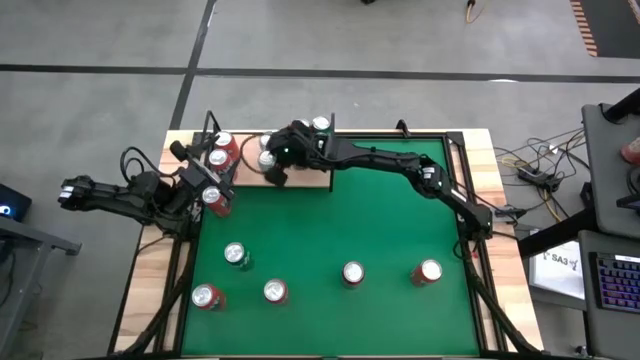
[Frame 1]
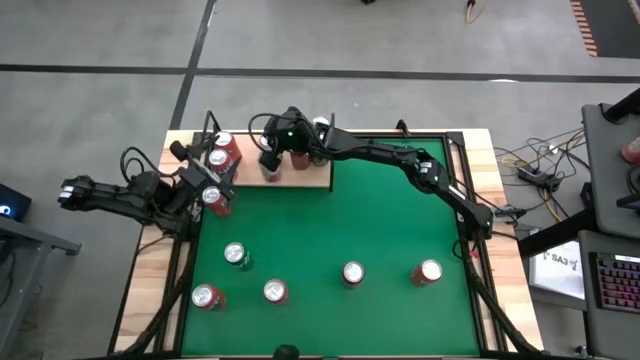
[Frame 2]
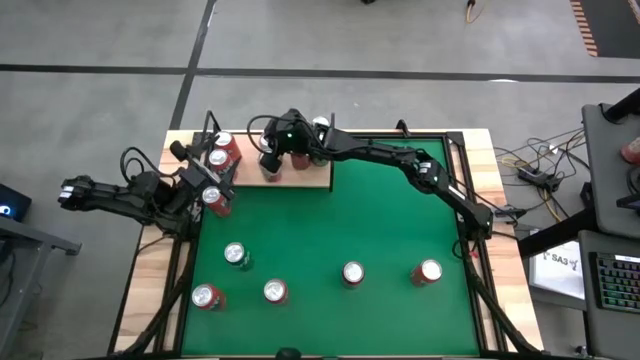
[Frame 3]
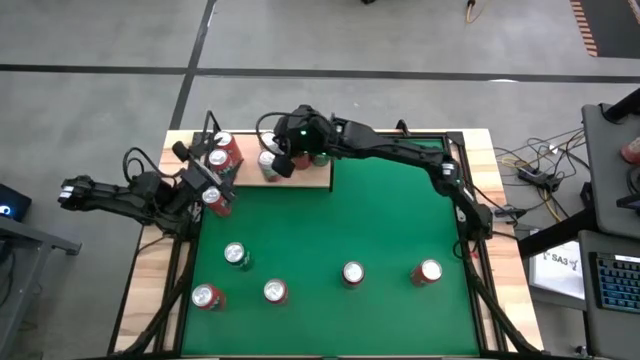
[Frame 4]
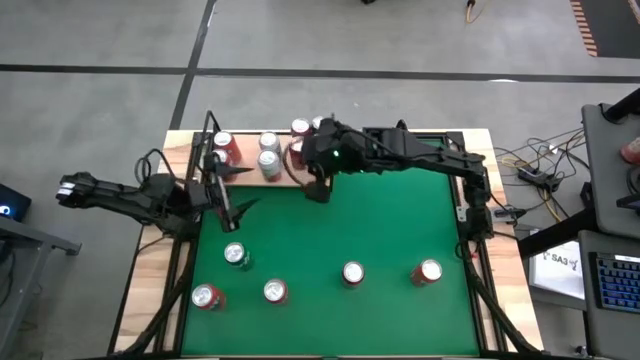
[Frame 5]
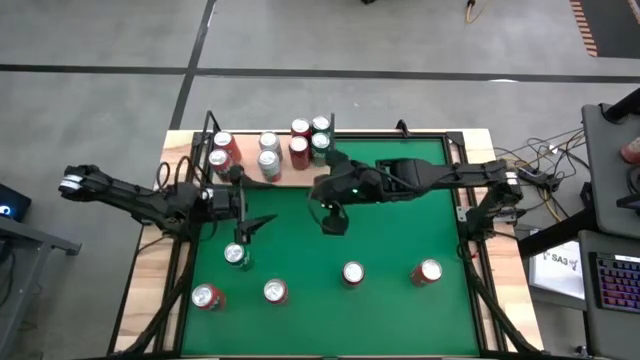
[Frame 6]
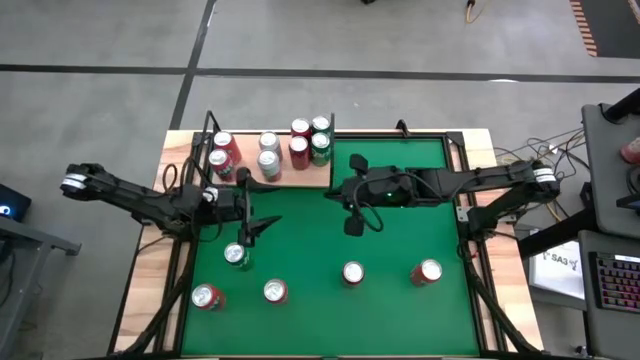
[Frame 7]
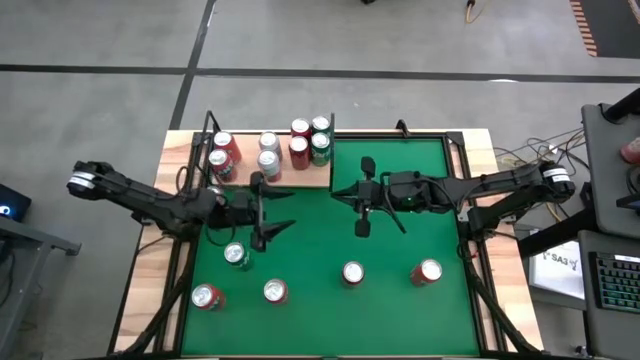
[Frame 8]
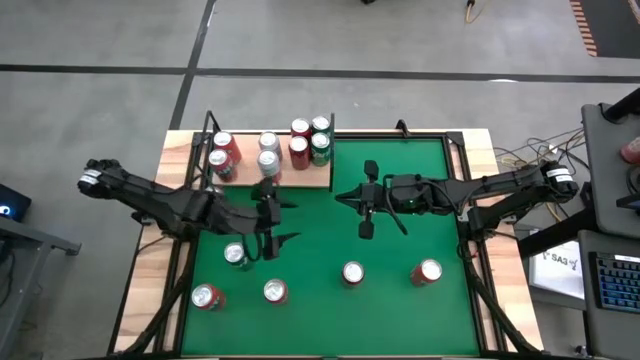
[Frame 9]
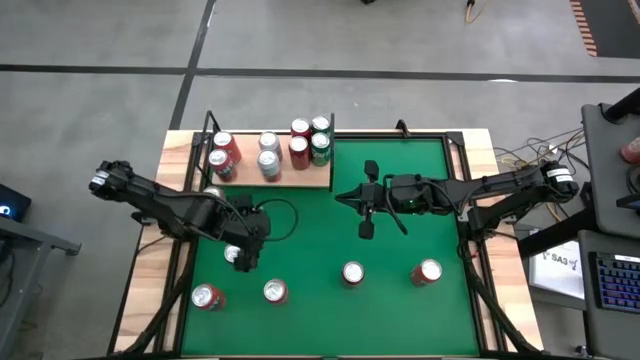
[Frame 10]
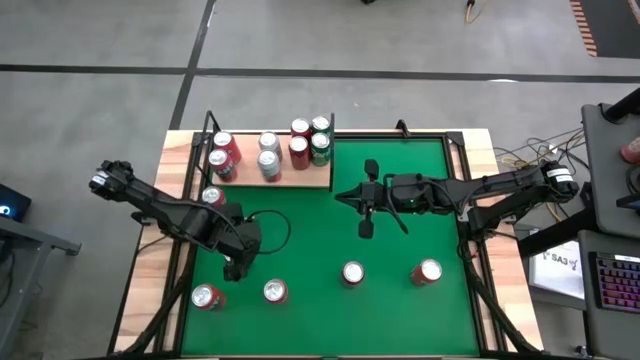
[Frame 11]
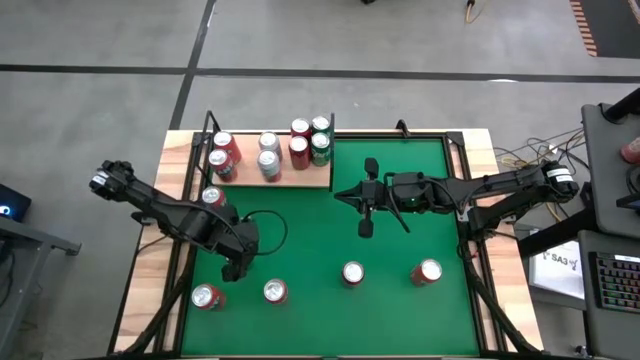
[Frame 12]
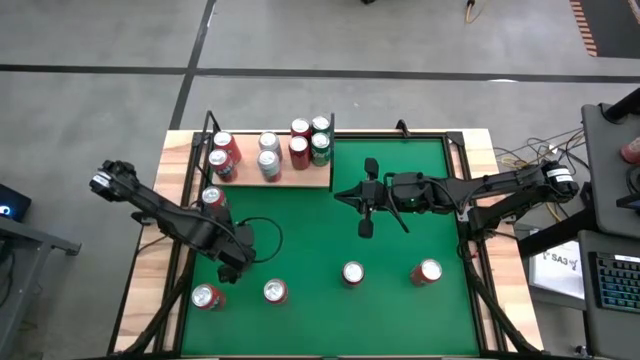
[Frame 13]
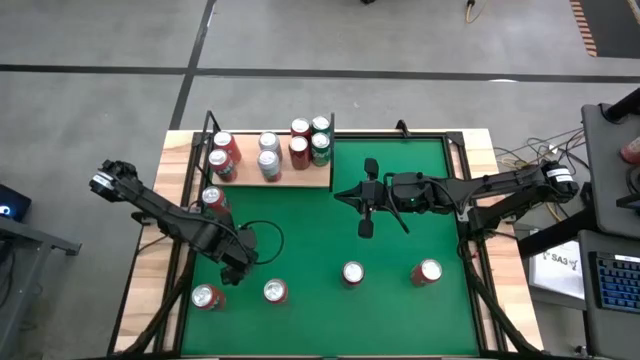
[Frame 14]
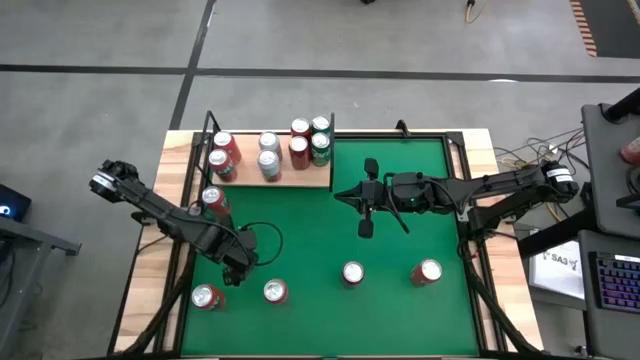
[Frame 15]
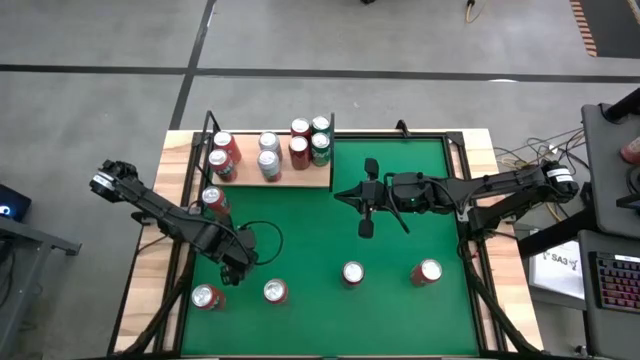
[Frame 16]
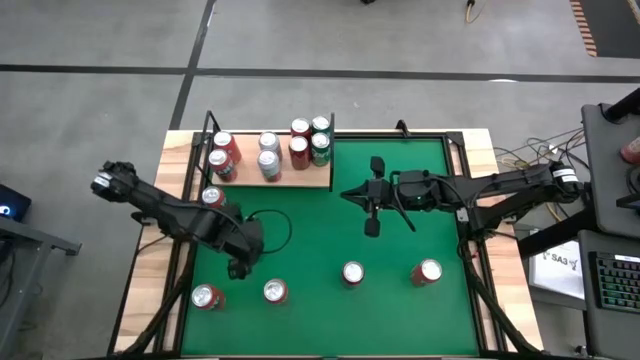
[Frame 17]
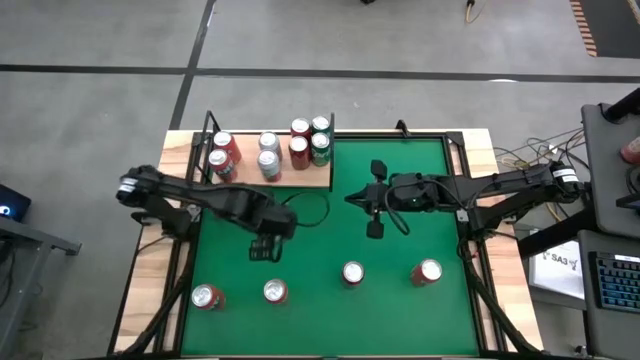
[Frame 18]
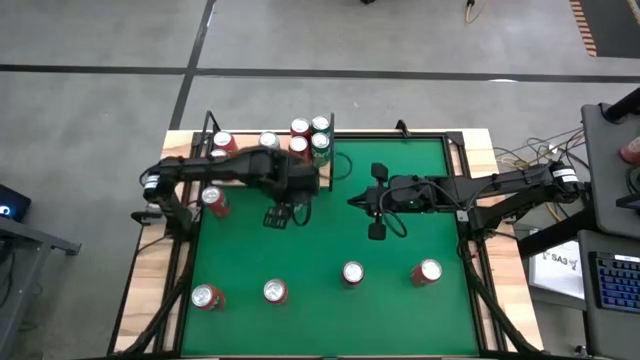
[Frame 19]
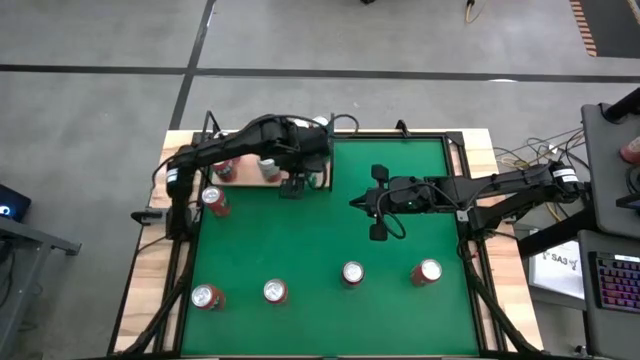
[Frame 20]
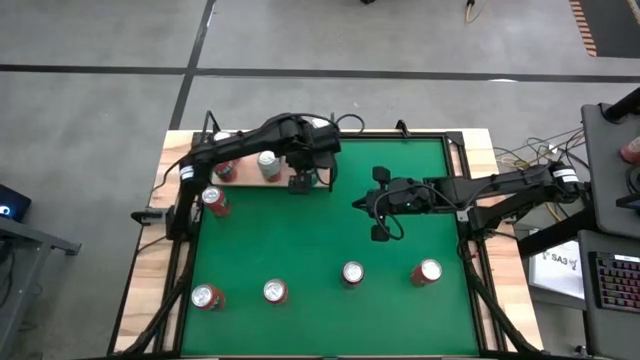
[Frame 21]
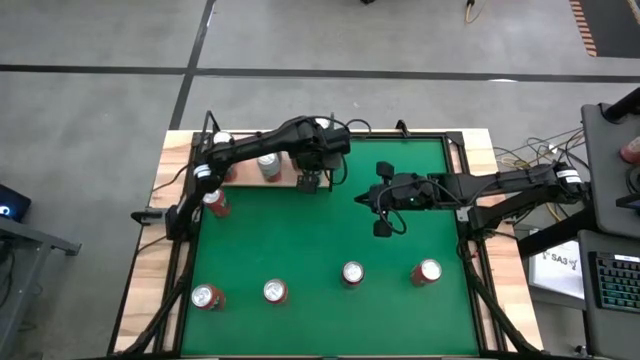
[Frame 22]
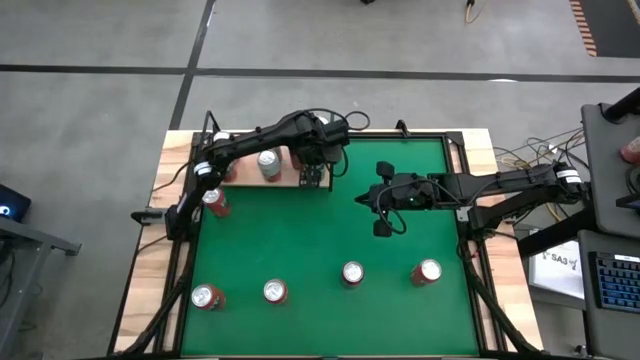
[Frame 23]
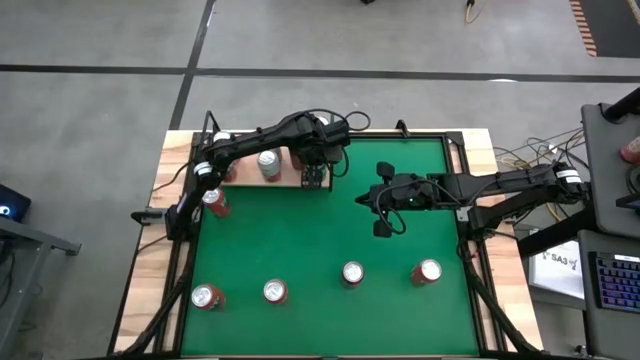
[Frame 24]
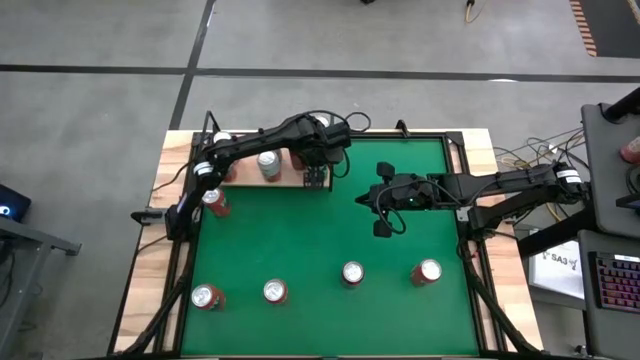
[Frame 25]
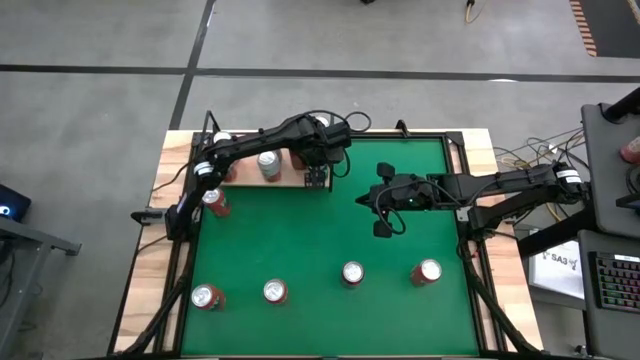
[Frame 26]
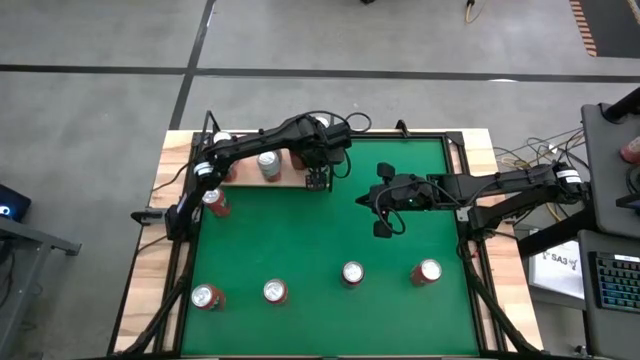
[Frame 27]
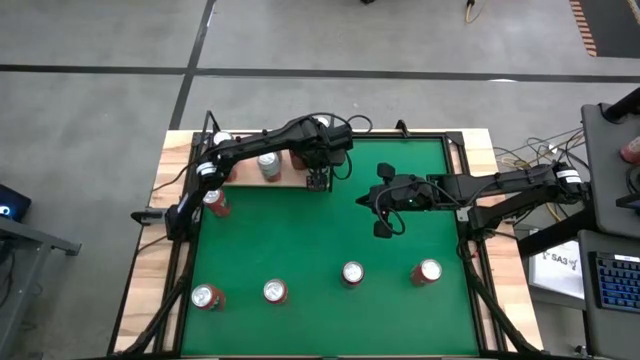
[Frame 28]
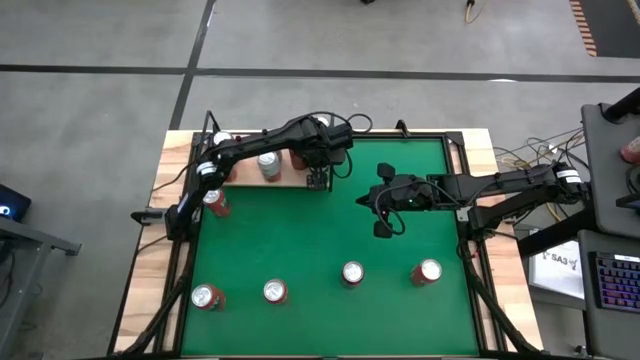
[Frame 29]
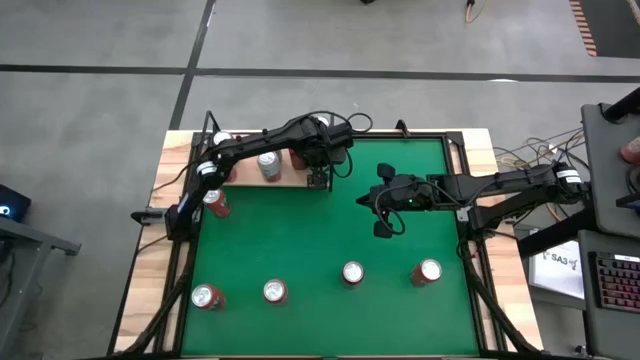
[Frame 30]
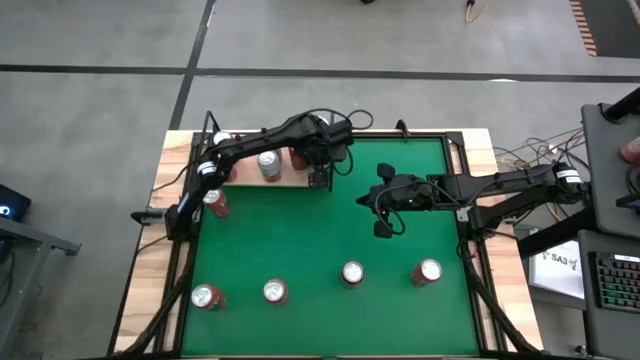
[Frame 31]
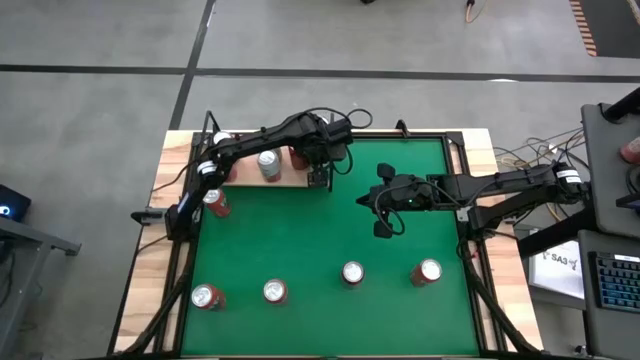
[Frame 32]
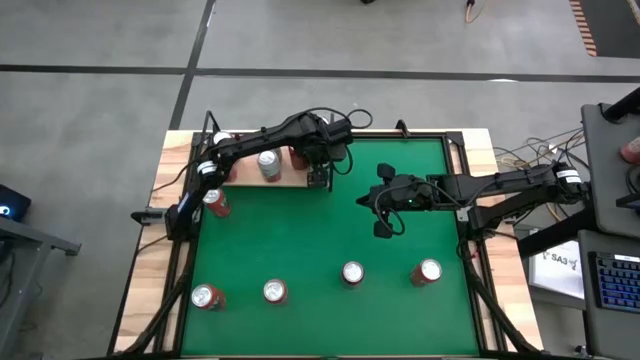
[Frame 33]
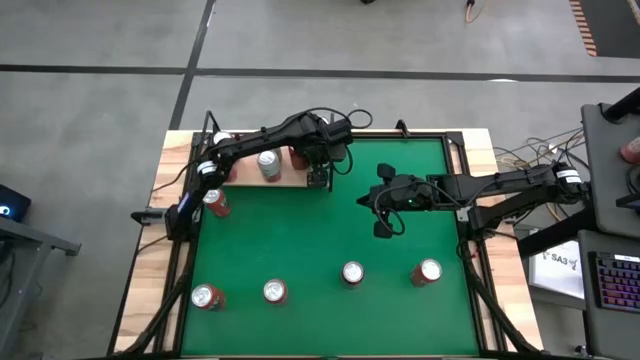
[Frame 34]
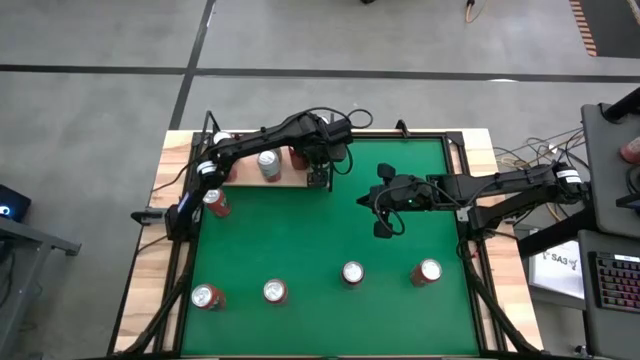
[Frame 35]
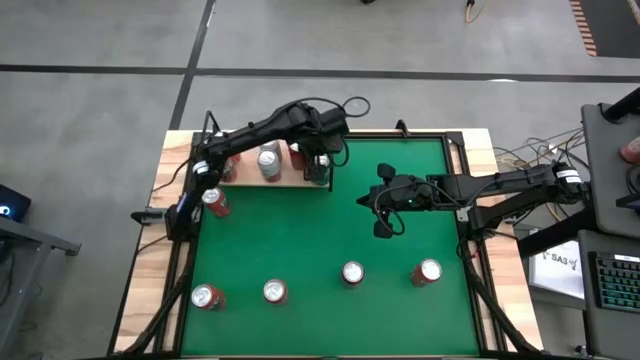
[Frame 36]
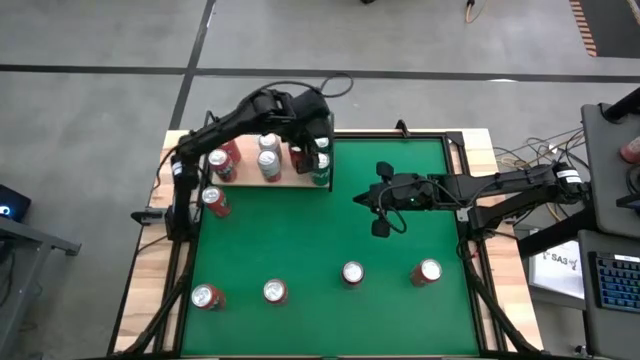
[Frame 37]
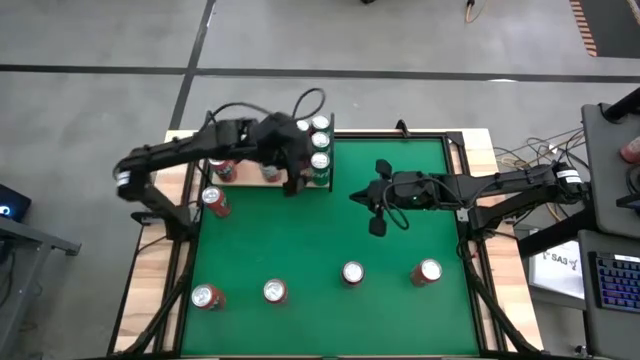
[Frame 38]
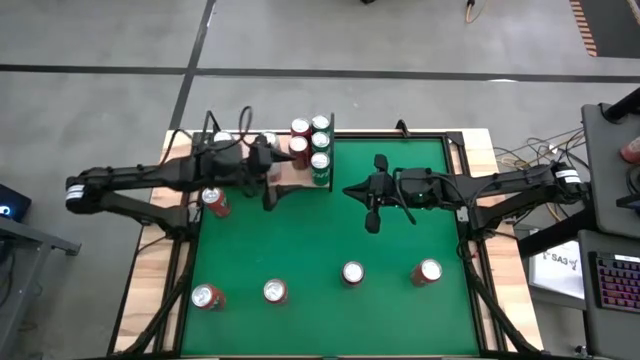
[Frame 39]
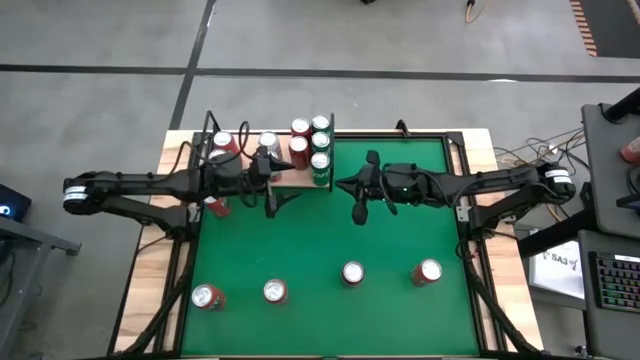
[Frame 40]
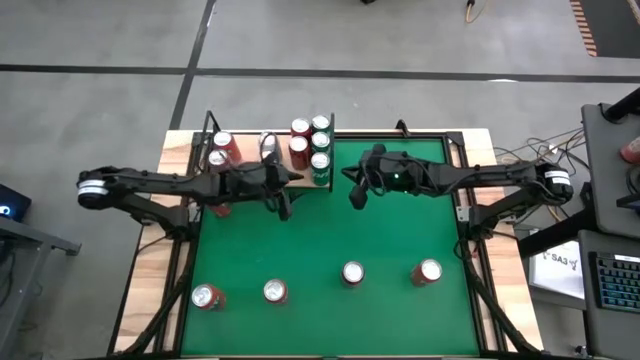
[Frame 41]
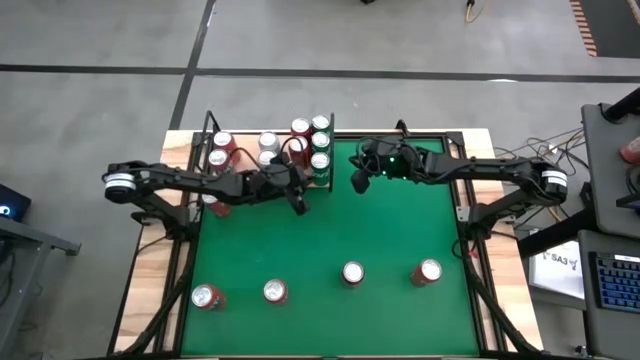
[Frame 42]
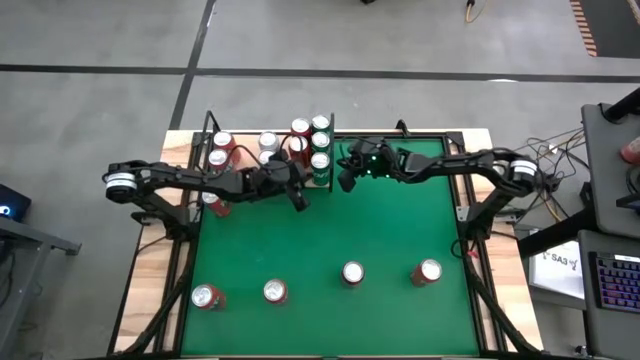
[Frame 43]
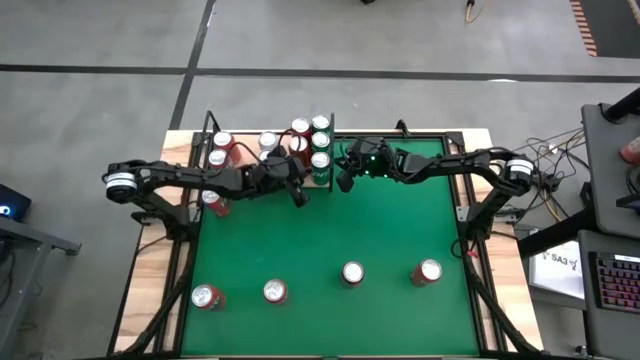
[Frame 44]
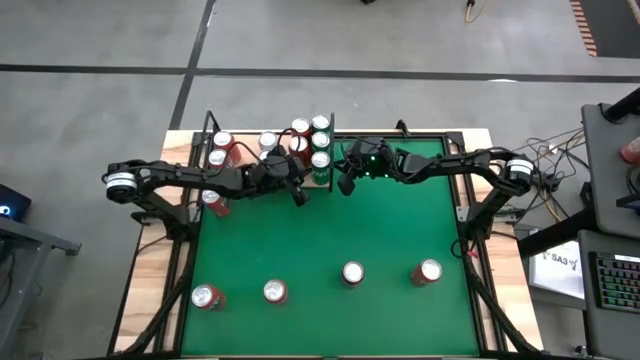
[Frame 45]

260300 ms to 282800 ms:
Task: Place canned beverage on shelf
Put the green soda can on the shelf aligned with the other green soda can
